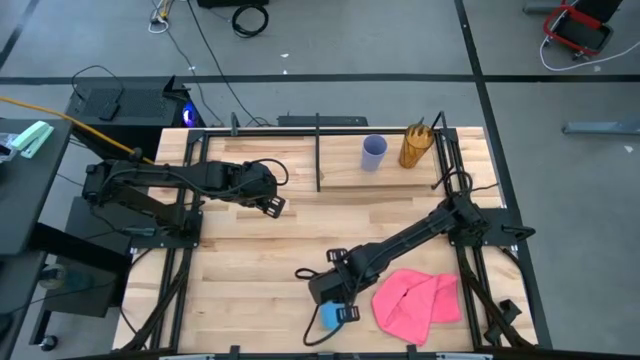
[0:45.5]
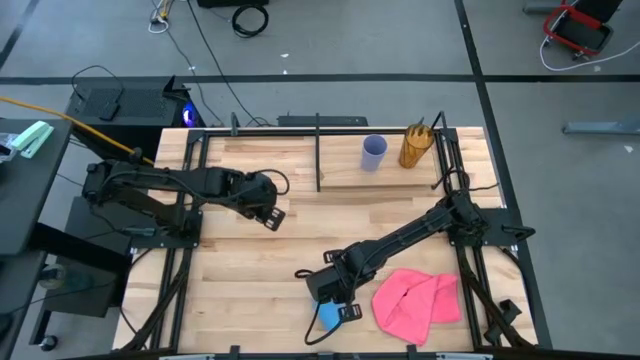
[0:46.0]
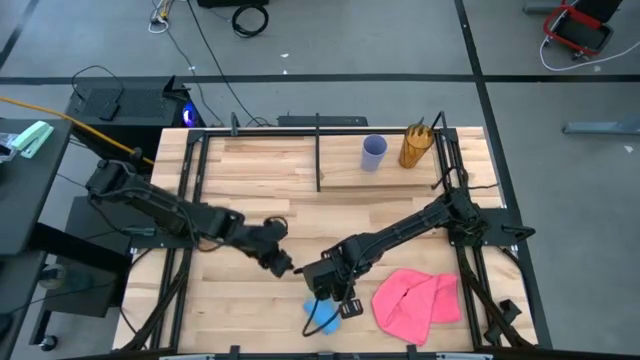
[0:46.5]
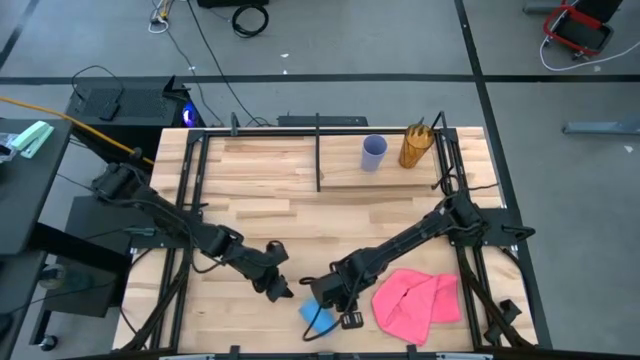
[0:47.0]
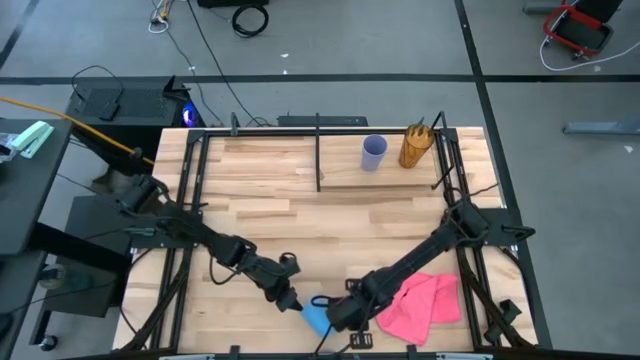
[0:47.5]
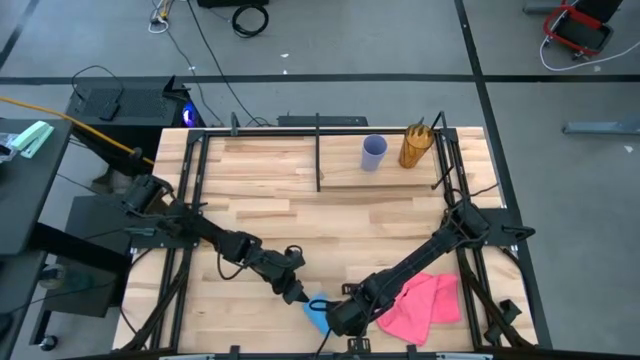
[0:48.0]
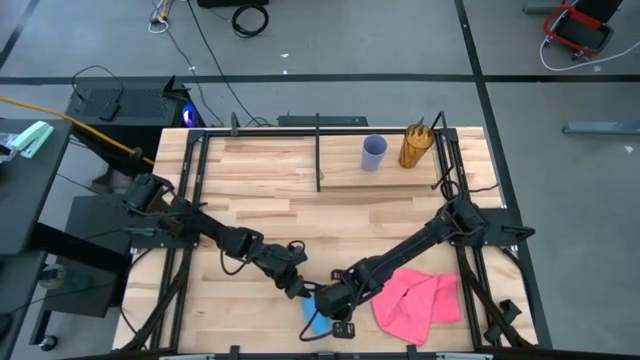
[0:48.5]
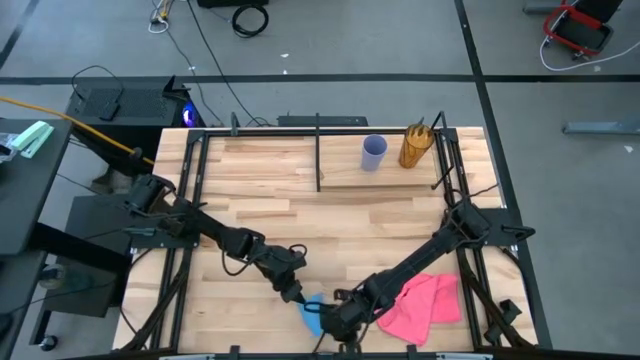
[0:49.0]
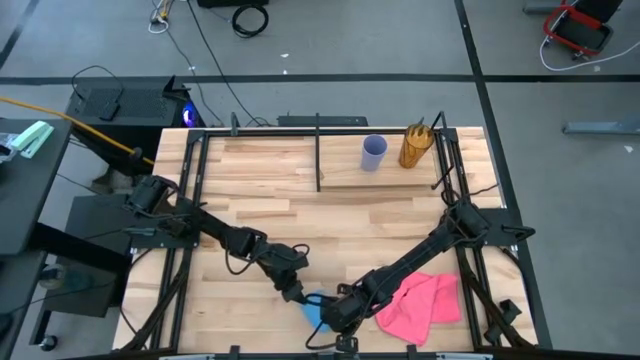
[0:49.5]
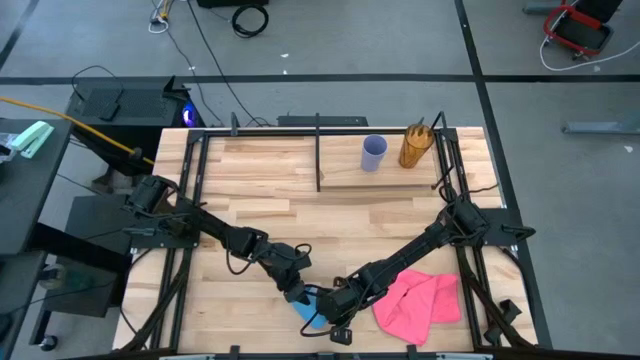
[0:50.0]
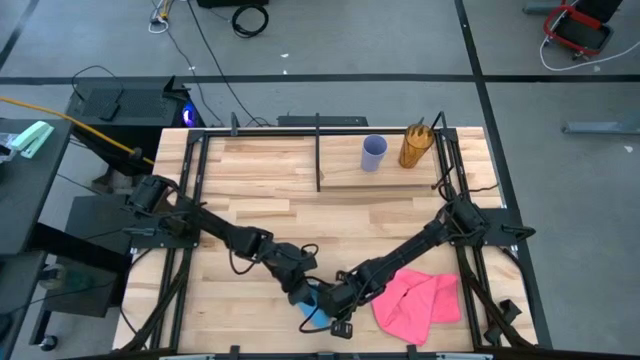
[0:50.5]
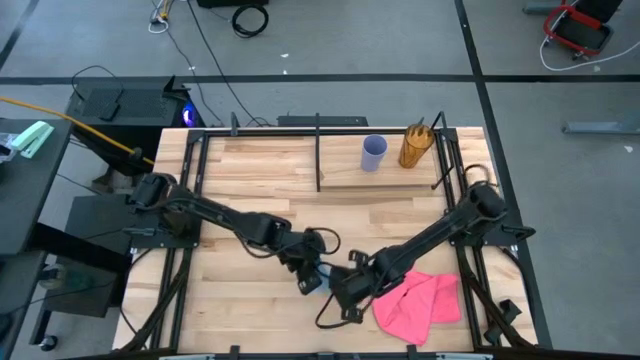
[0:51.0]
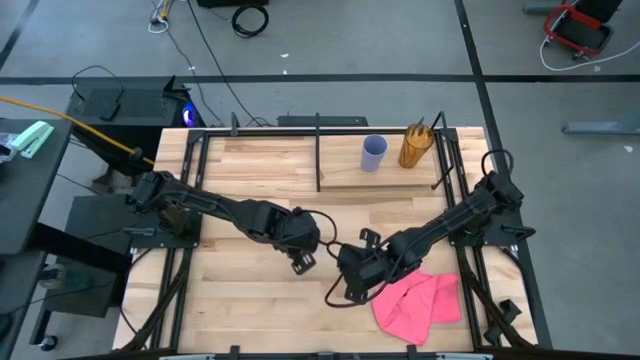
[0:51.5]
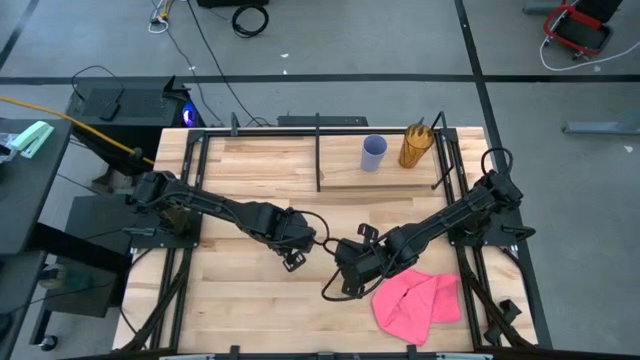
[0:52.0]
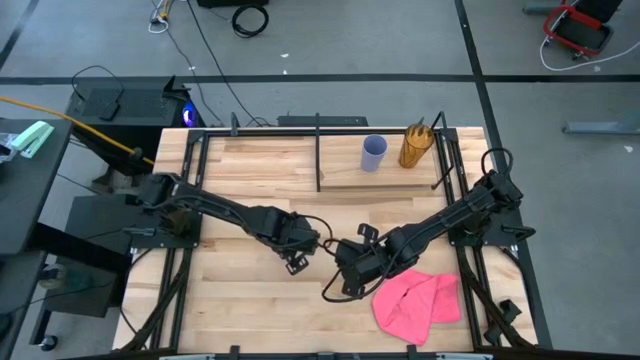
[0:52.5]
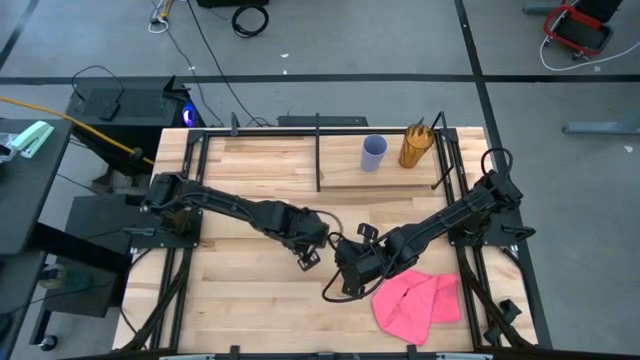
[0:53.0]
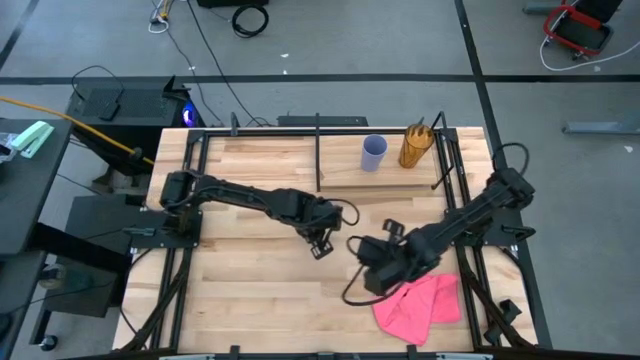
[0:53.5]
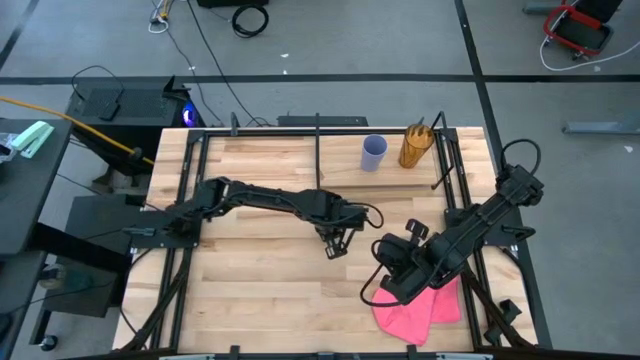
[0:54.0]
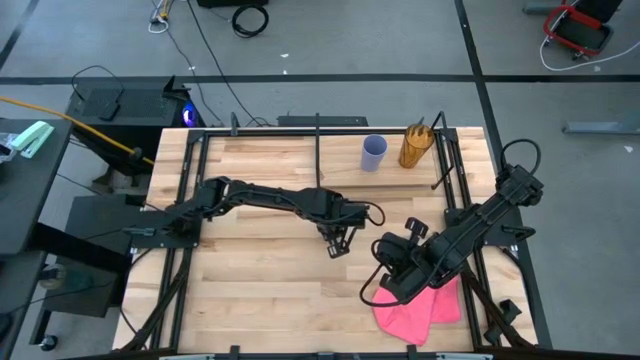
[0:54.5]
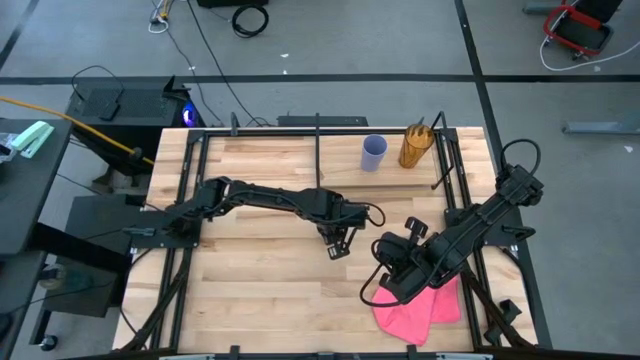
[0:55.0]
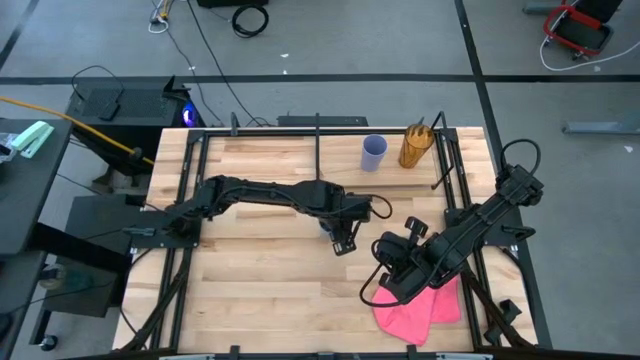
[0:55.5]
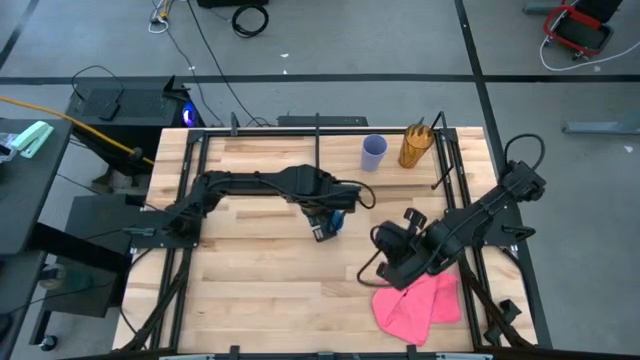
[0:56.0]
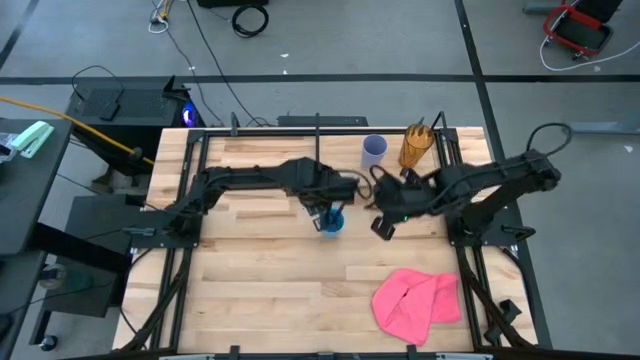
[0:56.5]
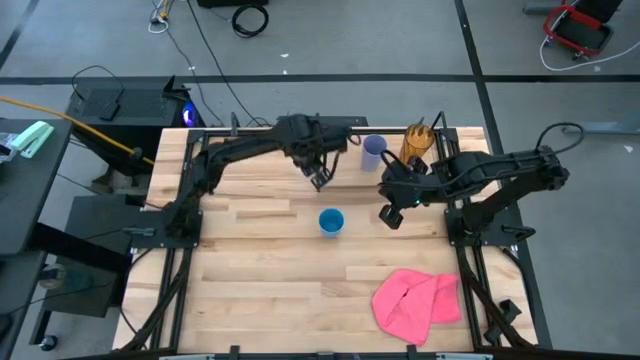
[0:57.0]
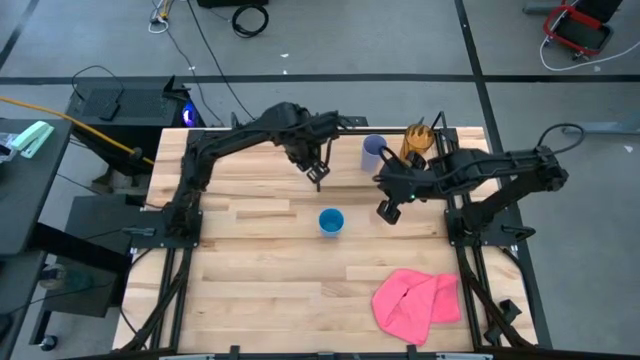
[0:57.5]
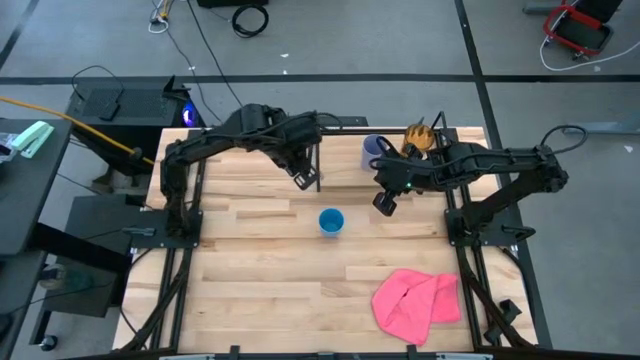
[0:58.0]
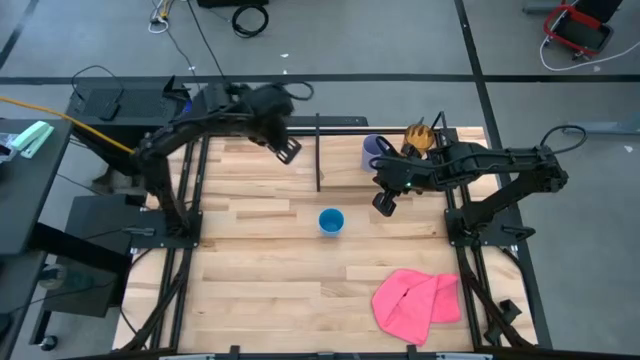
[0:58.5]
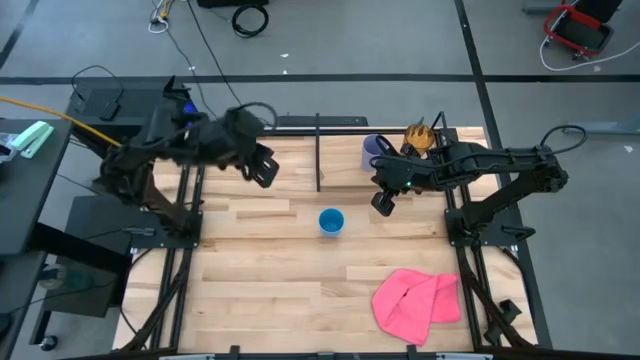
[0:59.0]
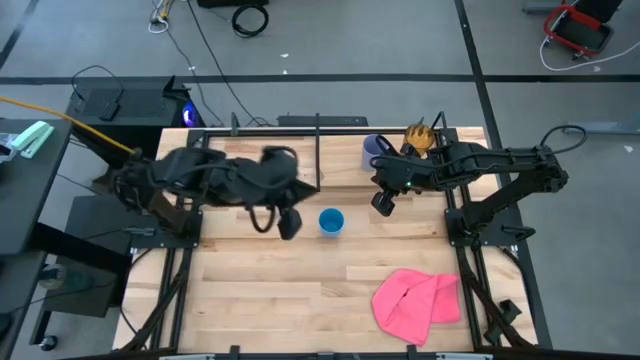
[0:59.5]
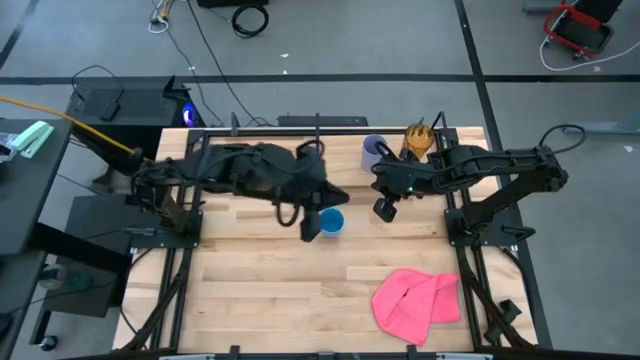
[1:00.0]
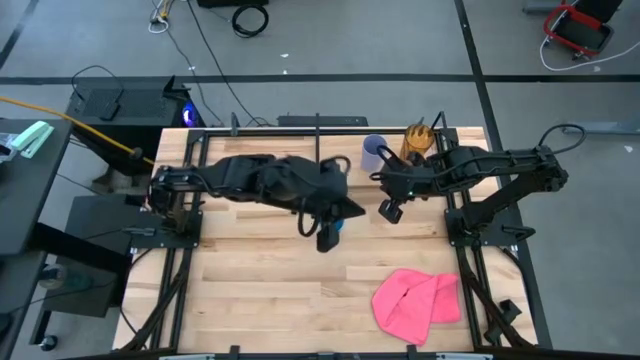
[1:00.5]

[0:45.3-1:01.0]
Task: Stack small to large cups/mugs on shelf
Put the blue cup on the shelf

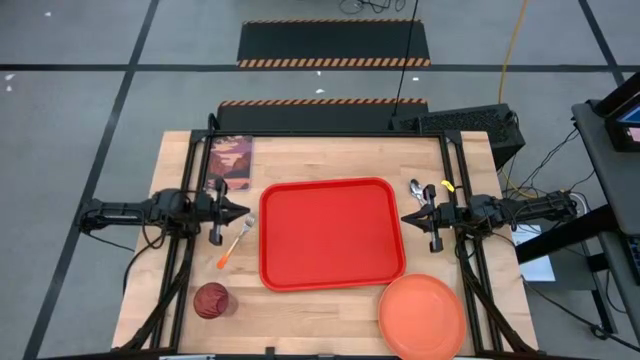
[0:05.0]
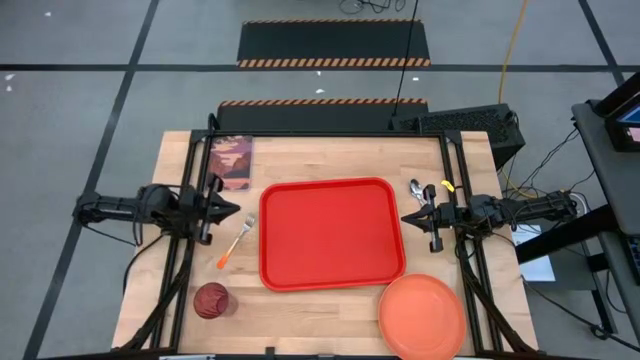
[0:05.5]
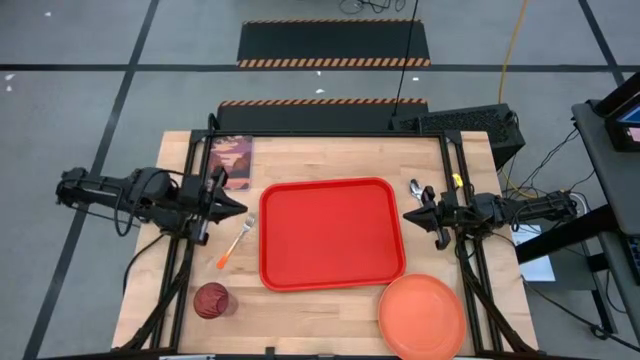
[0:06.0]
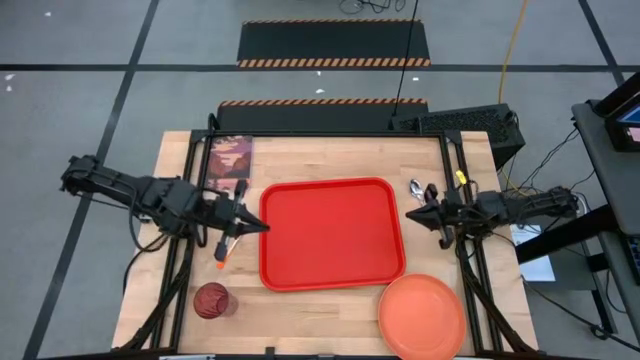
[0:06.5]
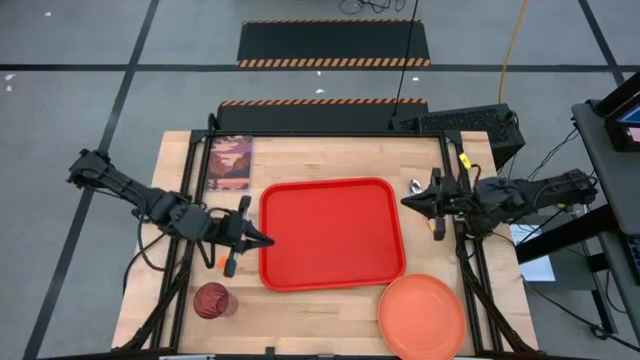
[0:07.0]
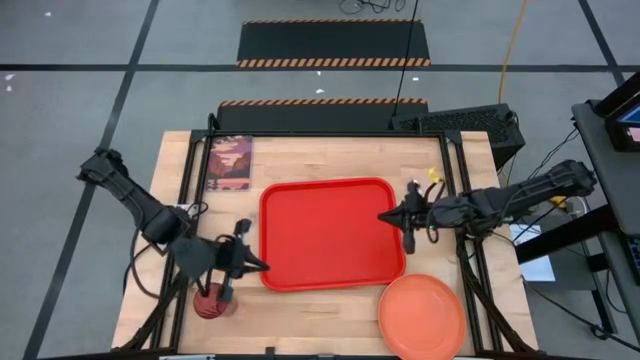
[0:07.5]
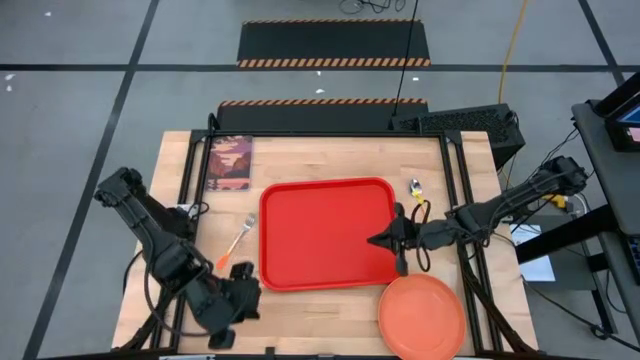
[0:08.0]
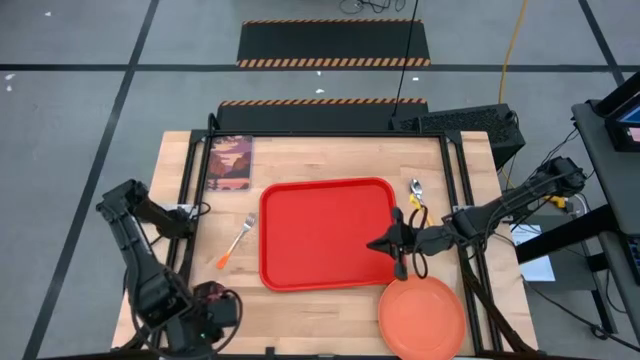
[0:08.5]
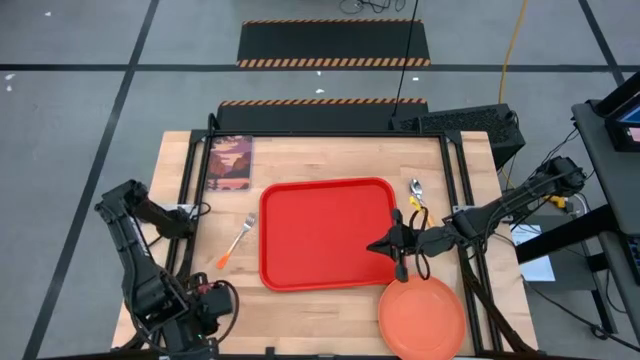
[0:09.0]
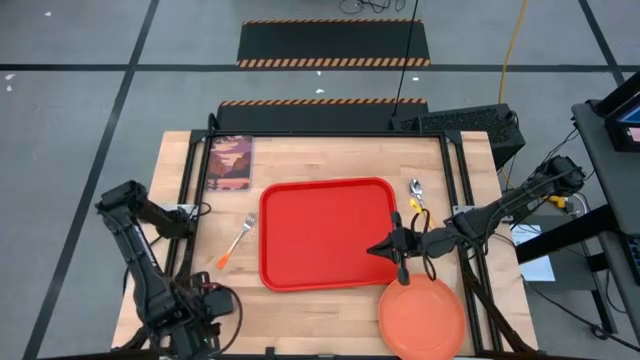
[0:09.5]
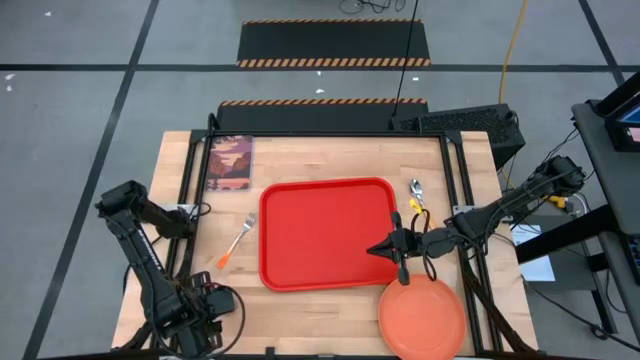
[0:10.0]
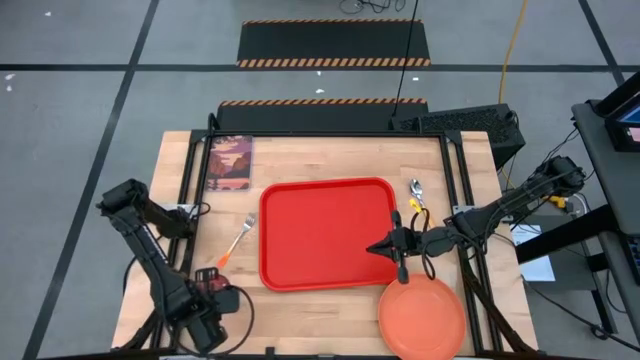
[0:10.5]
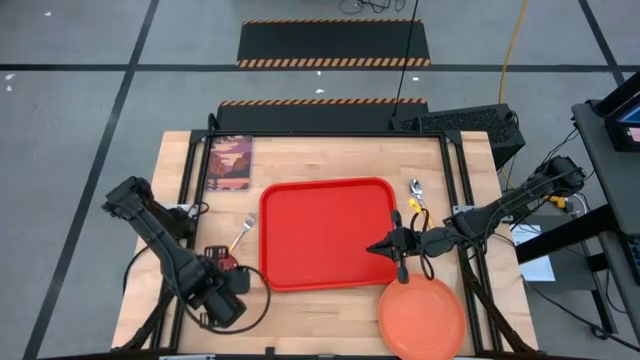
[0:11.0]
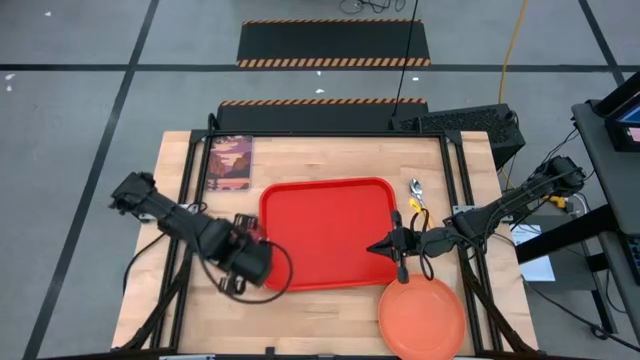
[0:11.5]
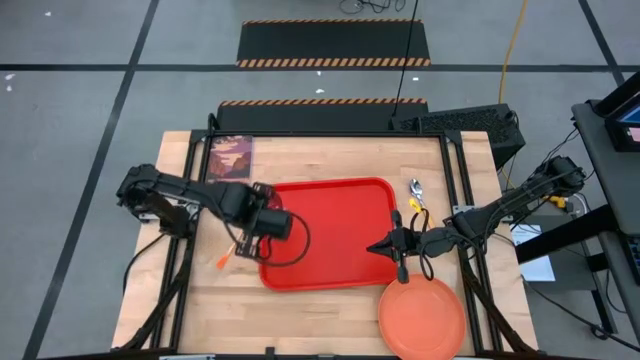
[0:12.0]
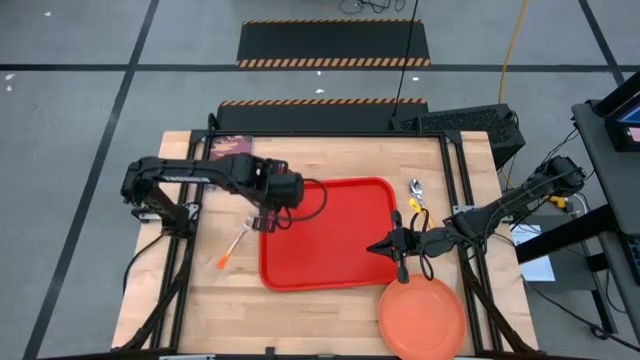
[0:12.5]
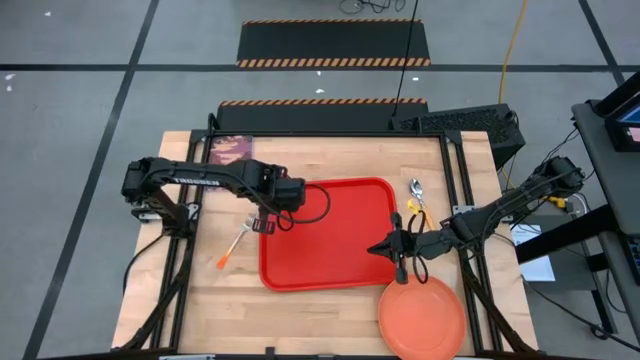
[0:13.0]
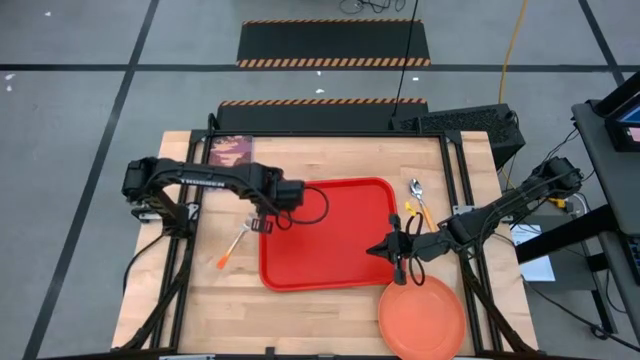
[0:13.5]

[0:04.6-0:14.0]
Task: Pick and place plate/cup/fork/spoon on tray
Put the red cup on the top left of the red tray
